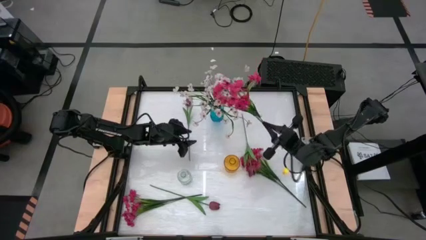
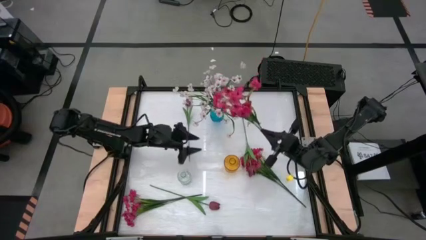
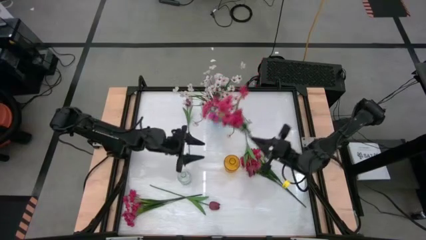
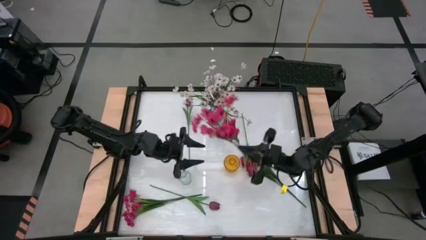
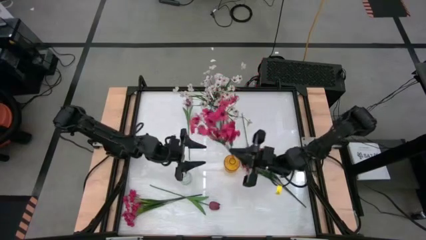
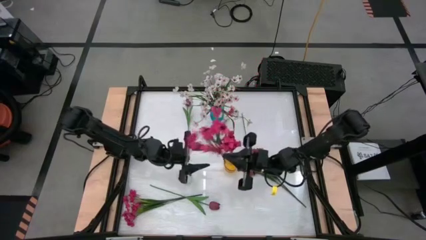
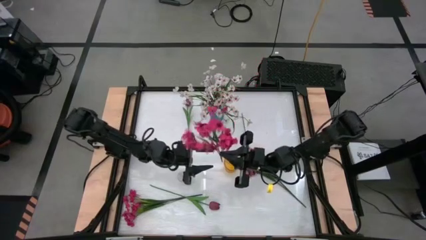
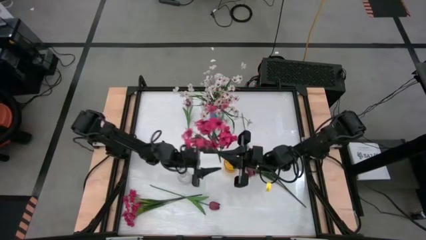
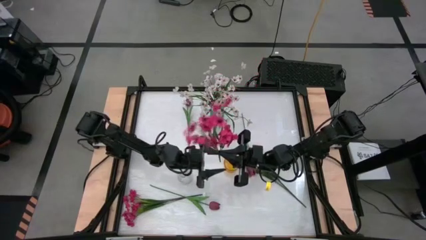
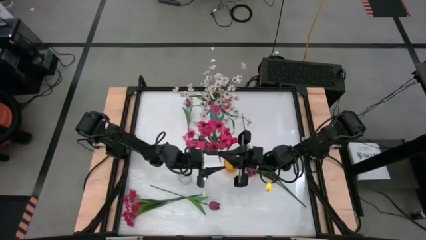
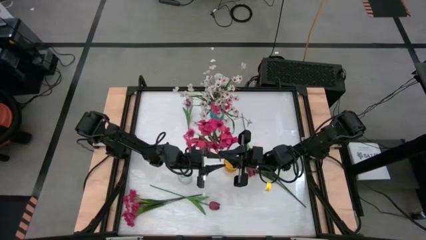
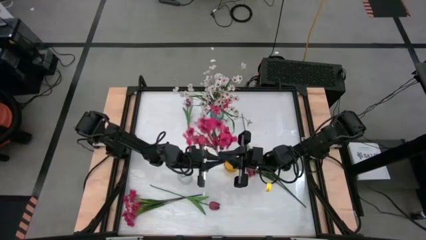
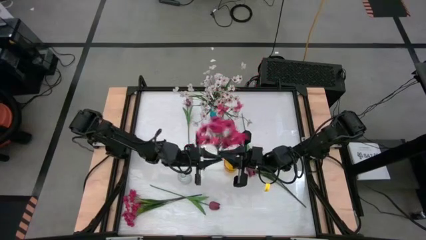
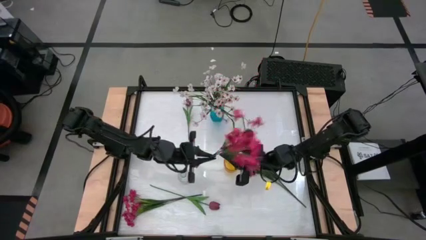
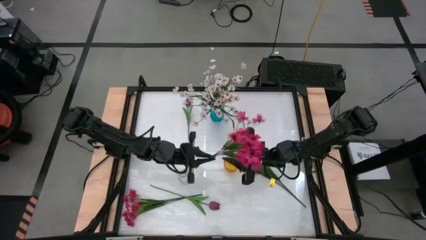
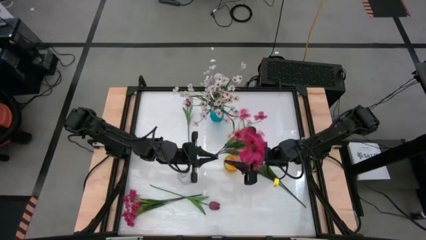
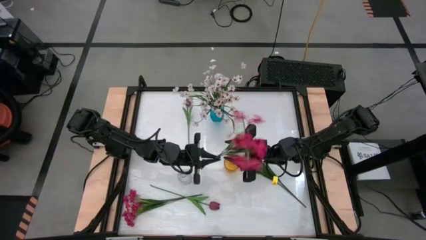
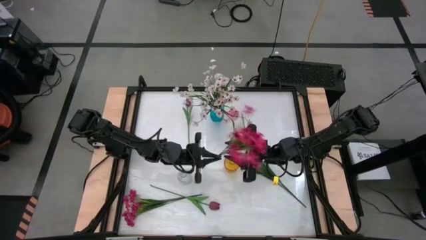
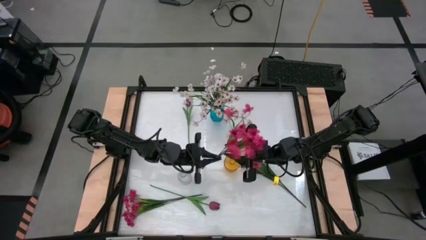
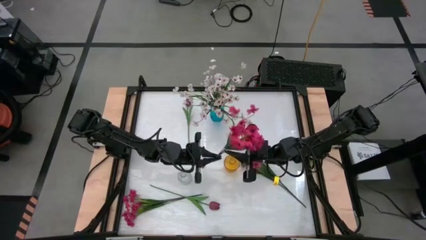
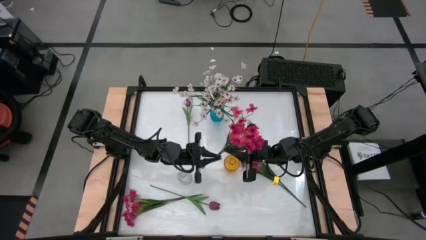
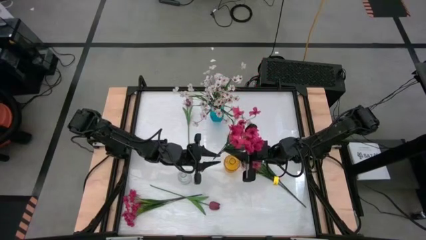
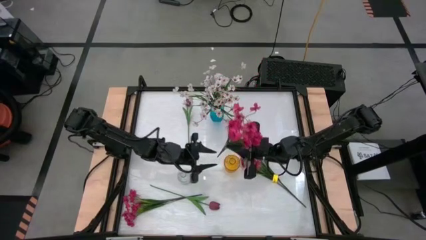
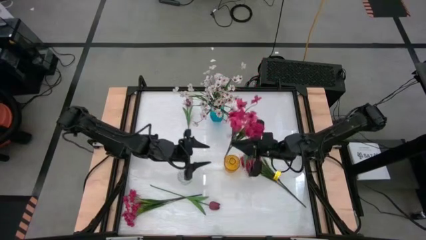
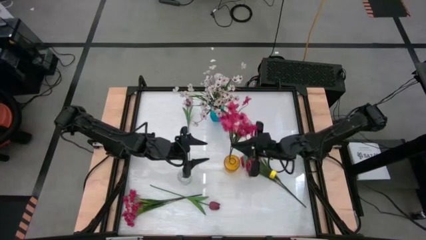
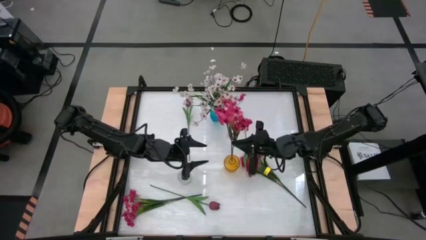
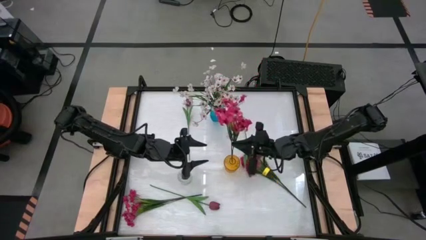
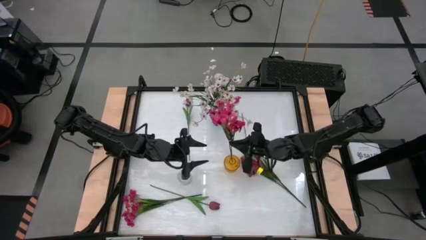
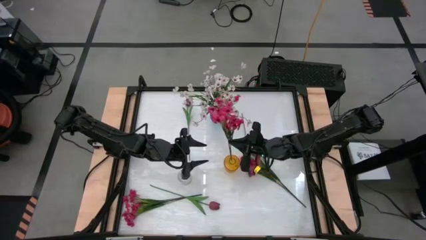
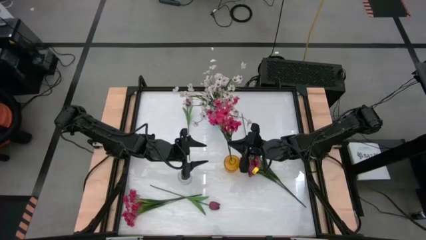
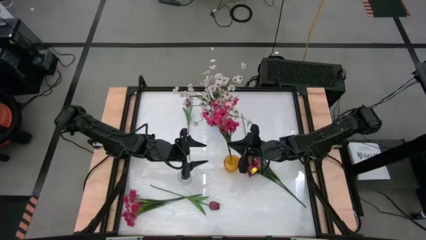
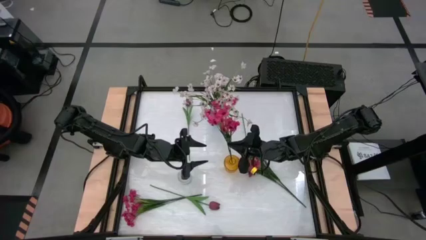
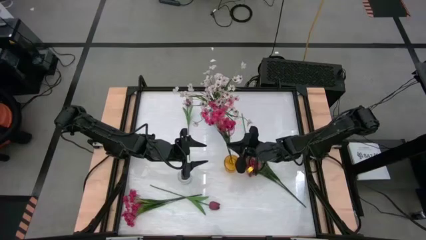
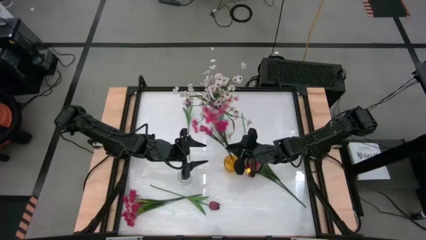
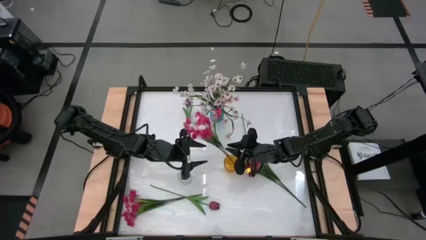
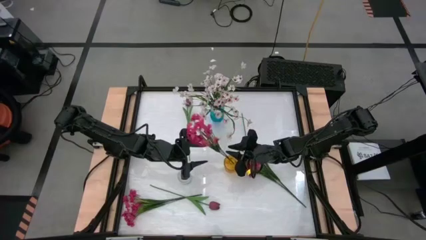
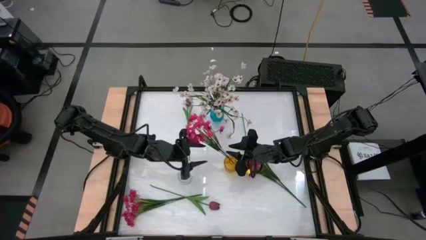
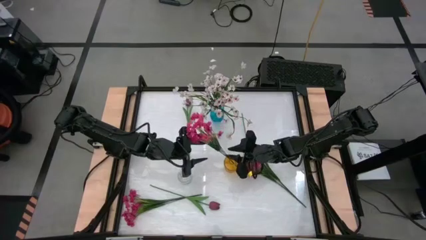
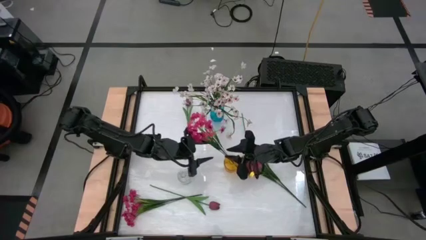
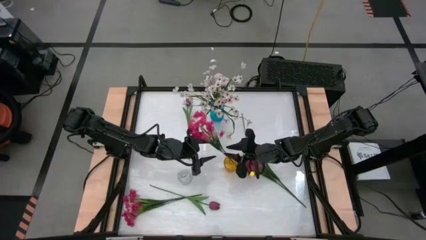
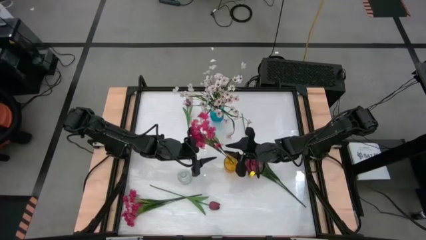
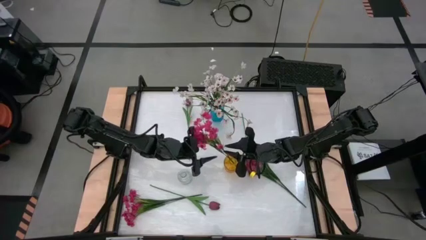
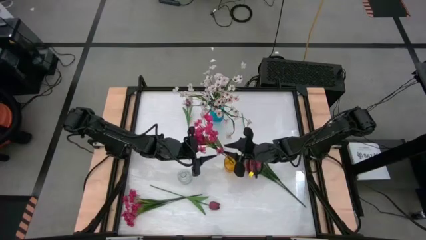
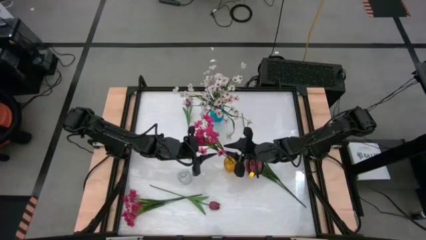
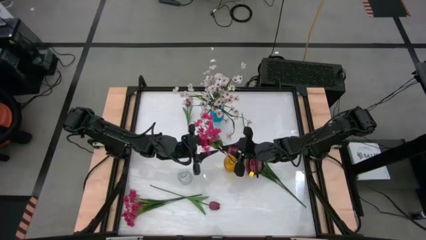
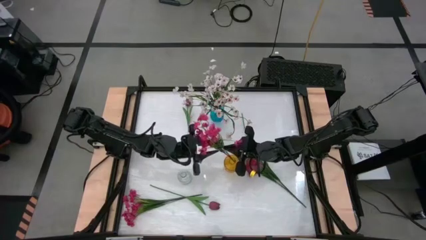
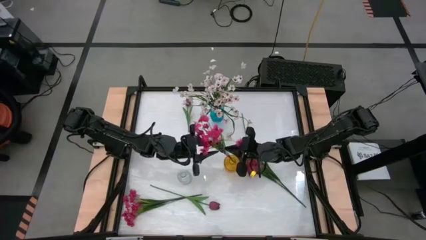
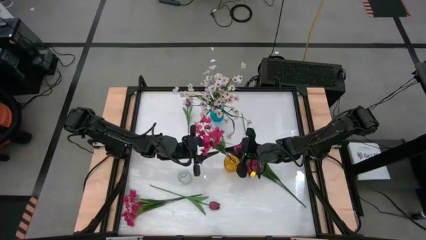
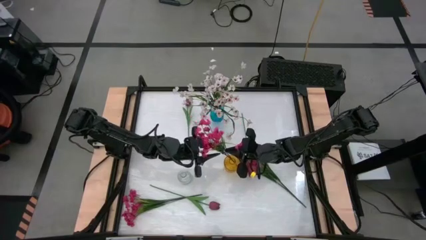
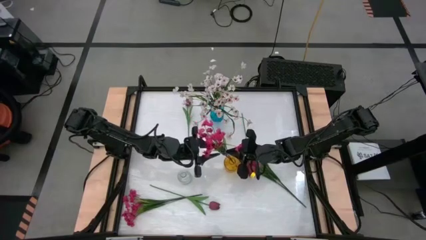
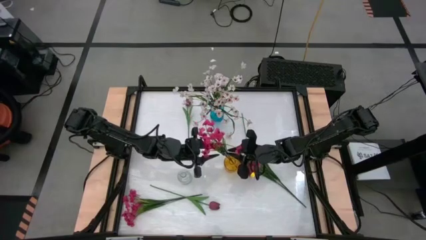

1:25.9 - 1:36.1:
Task: Sort flowers into vase by color
Put the top pink flowers into the yellow vase
